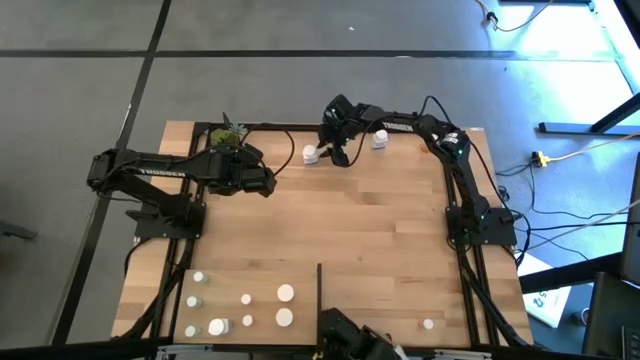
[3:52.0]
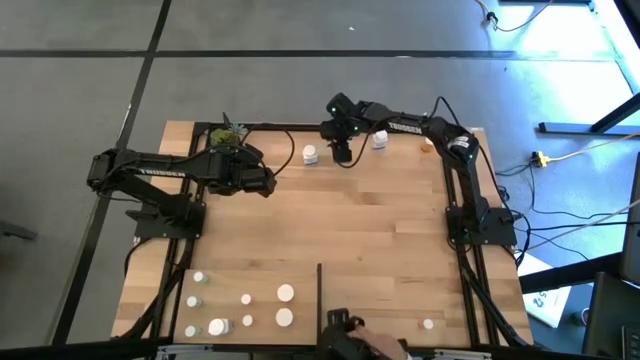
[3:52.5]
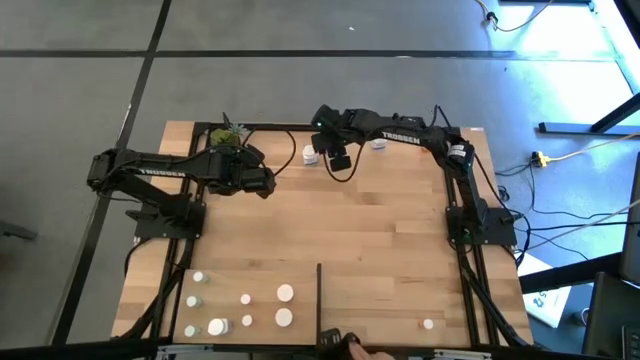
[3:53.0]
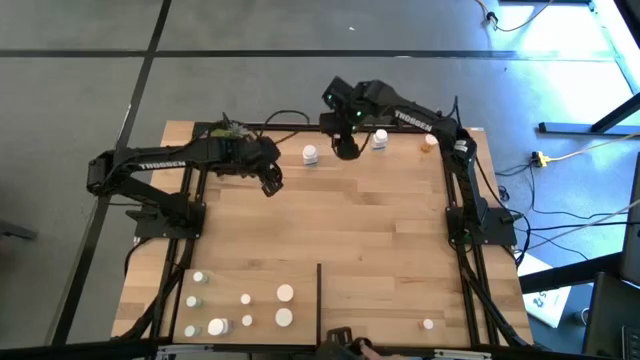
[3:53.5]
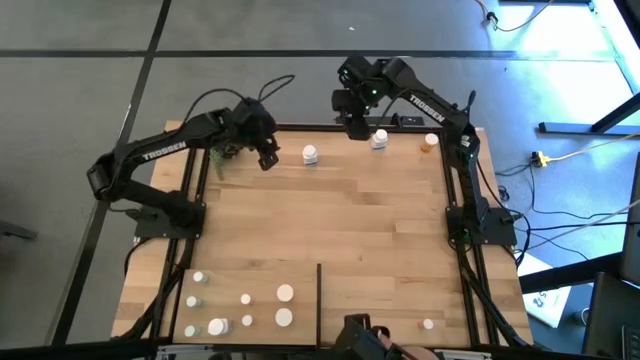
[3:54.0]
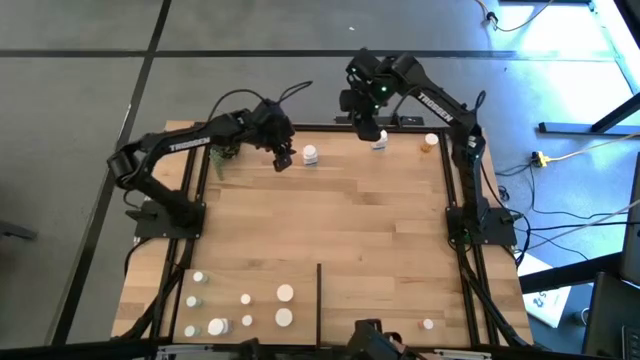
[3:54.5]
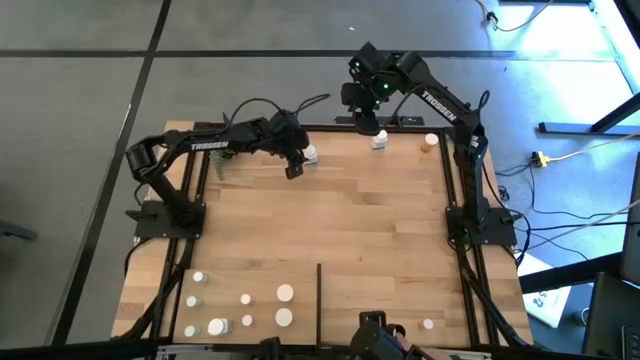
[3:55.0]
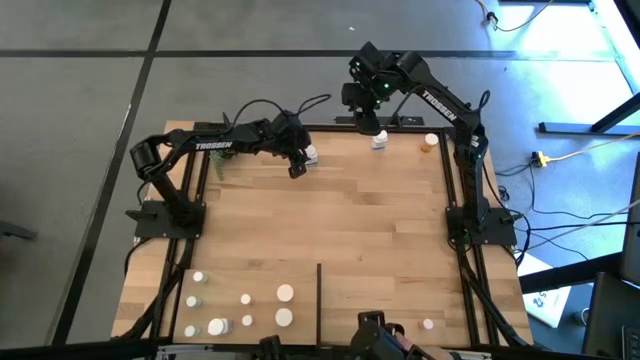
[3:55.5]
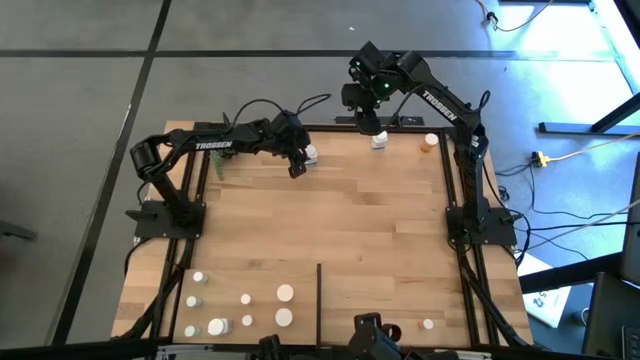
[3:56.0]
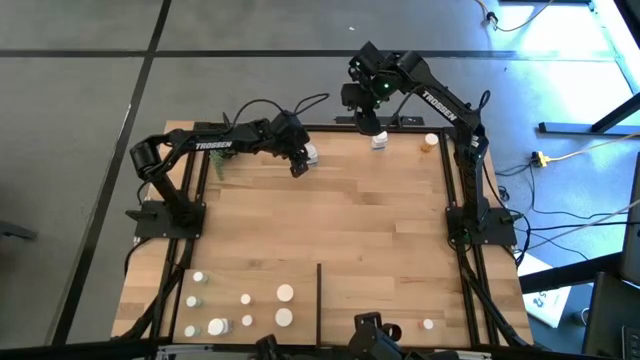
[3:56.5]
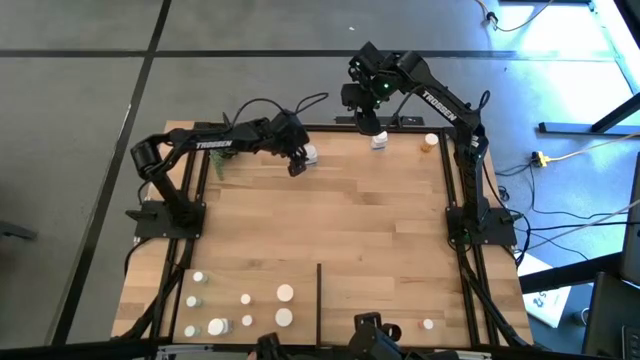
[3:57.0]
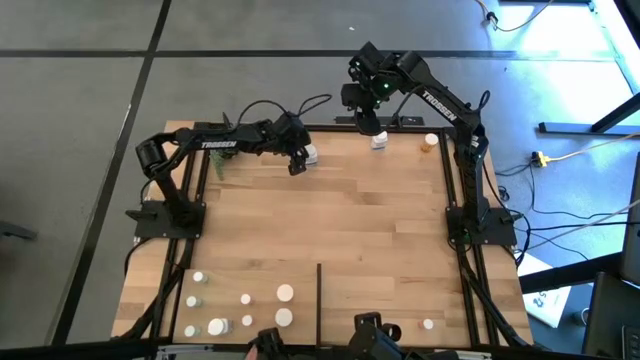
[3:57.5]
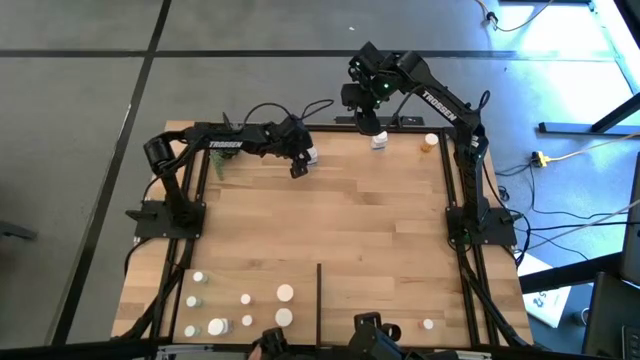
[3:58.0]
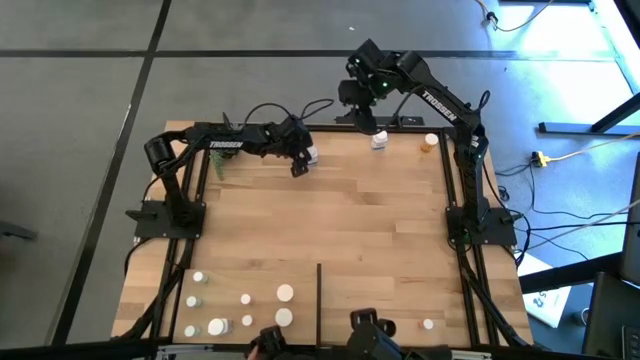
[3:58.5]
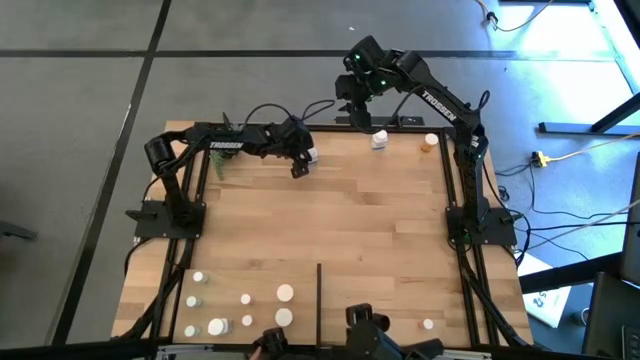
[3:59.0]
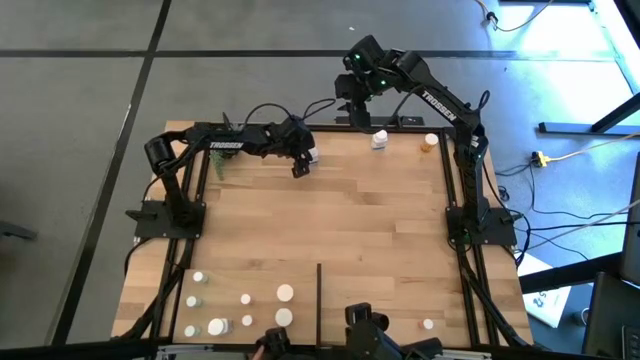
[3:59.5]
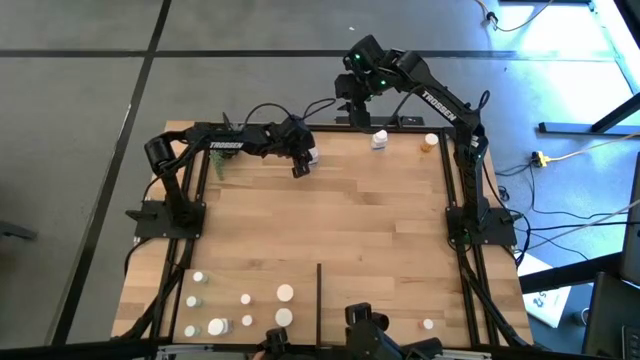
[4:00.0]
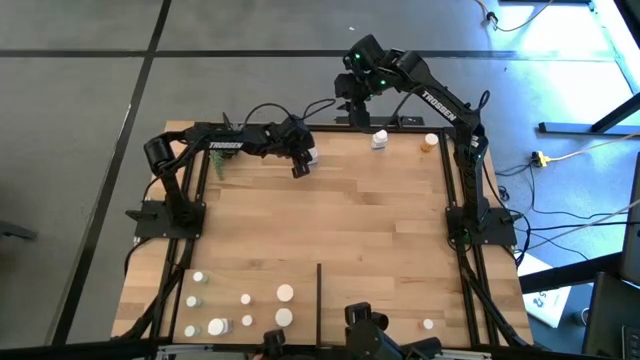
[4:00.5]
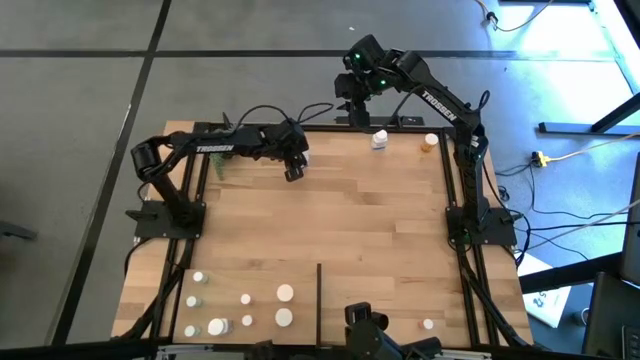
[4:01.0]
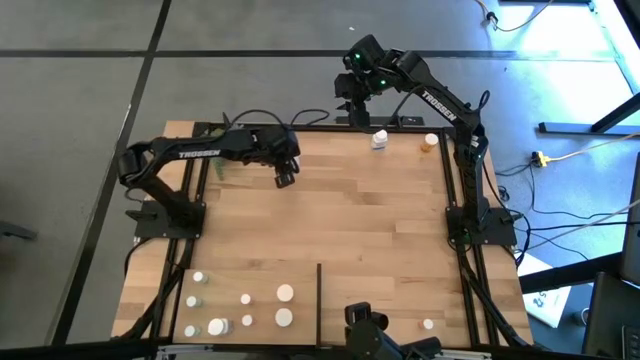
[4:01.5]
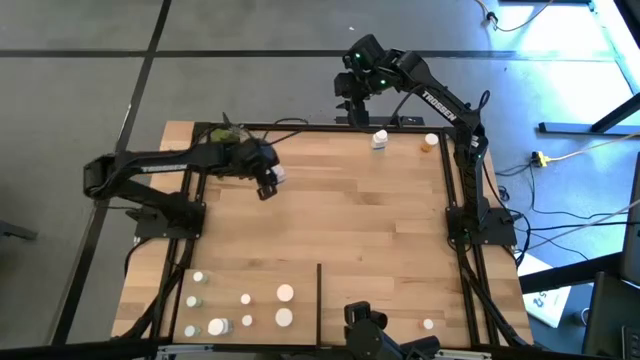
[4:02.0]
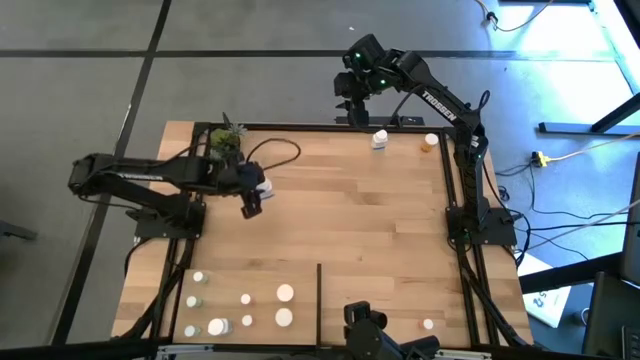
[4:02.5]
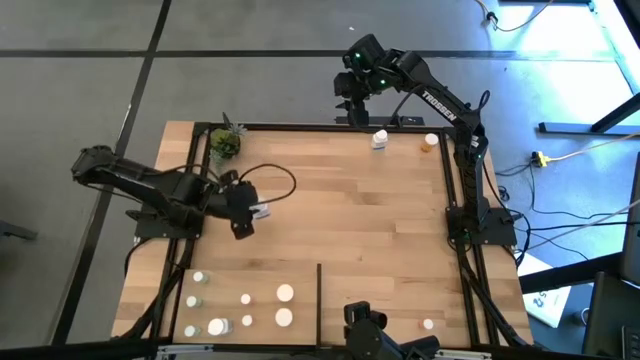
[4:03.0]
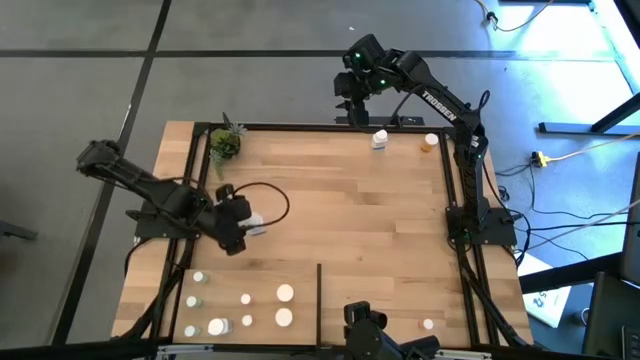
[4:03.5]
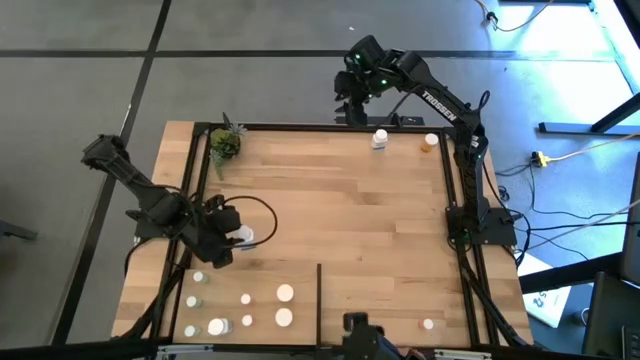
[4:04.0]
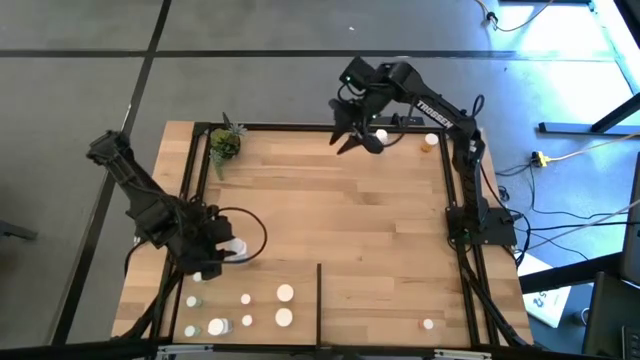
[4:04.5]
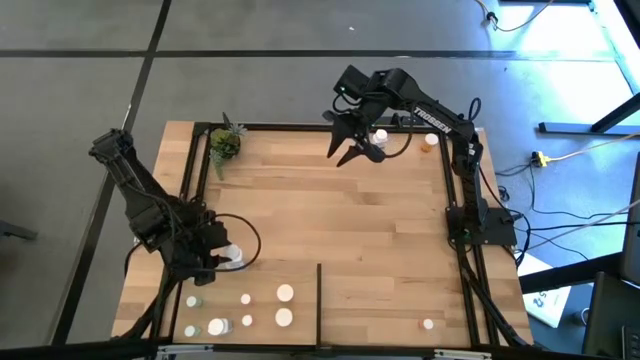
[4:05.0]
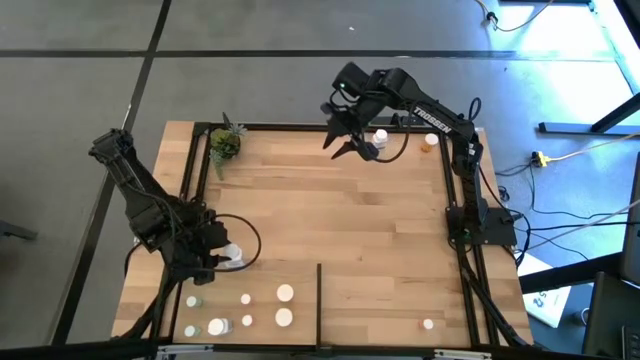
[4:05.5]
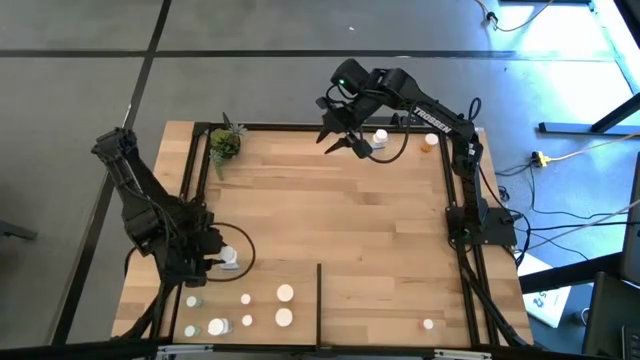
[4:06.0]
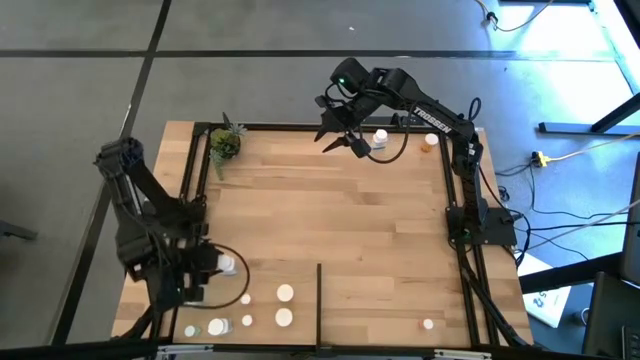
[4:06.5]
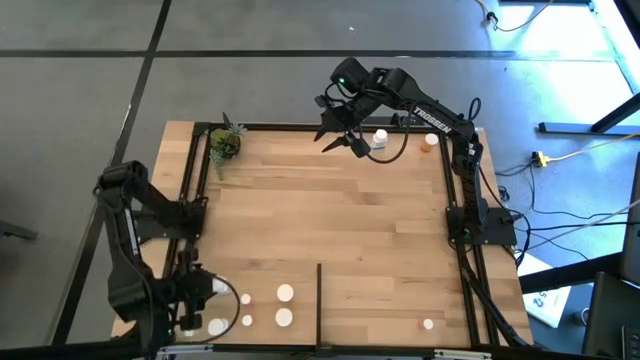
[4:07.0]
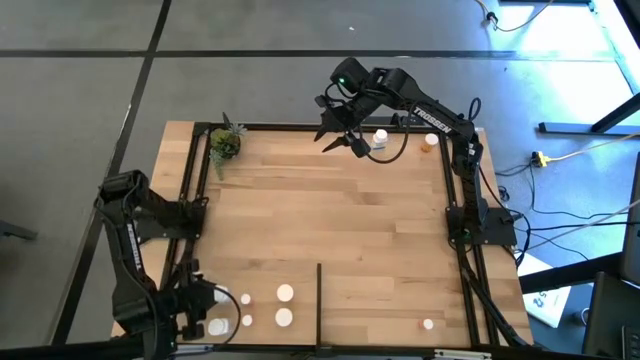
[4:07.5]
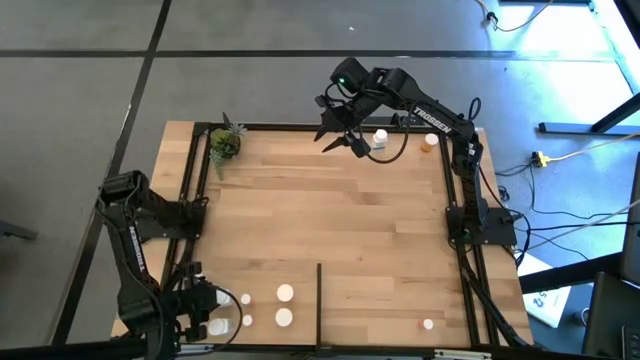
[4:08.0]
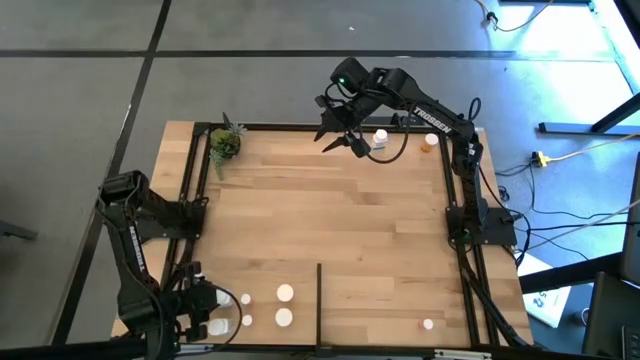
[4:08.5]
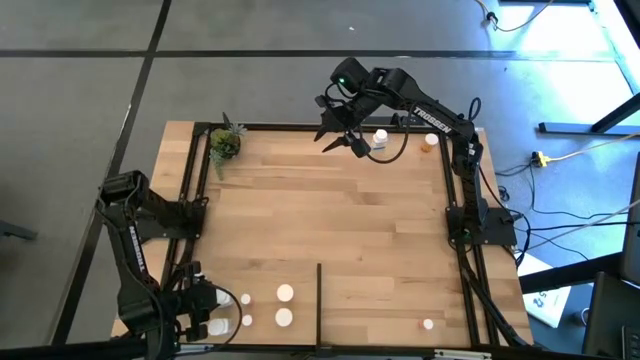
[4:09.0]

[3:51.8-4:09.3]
Task: Pick and place medicine bottles onto shelf by color
Put the left white pill bottle on the shelf aligned with the other white pill bottle

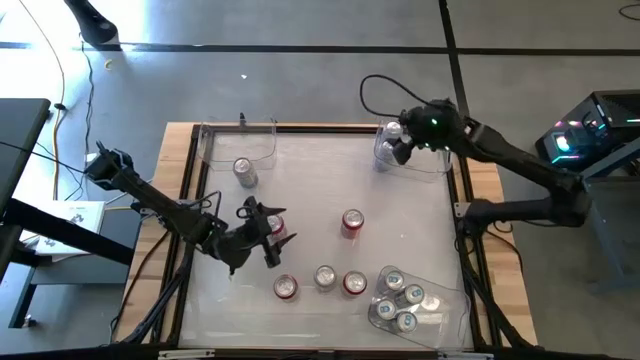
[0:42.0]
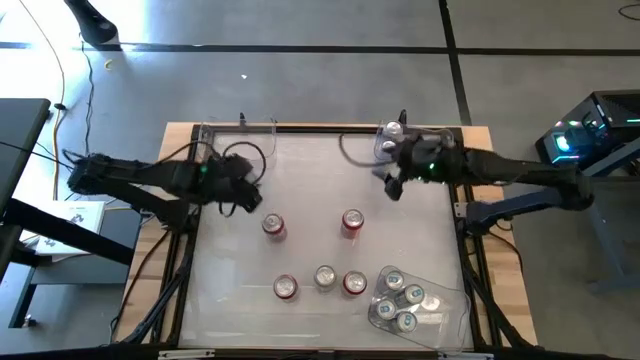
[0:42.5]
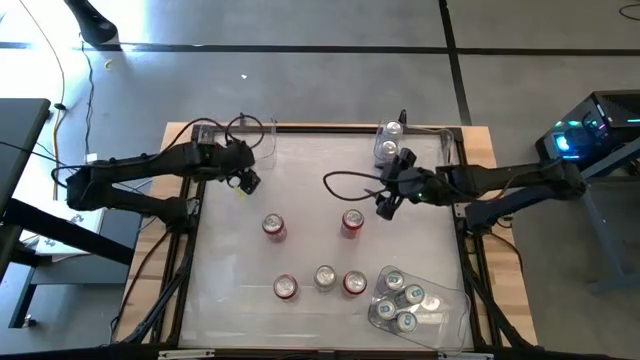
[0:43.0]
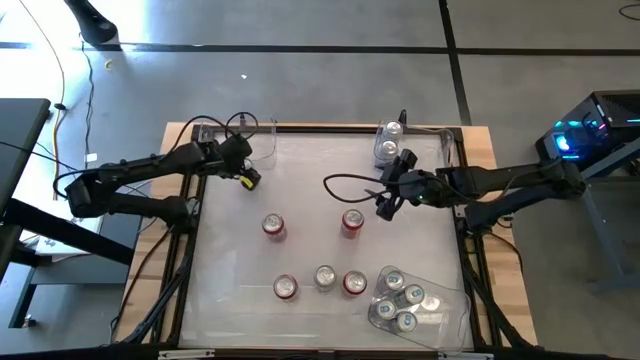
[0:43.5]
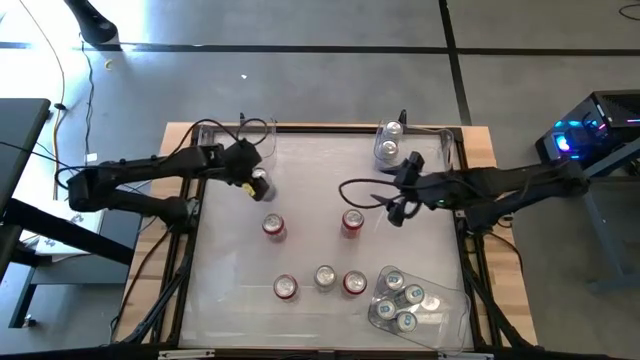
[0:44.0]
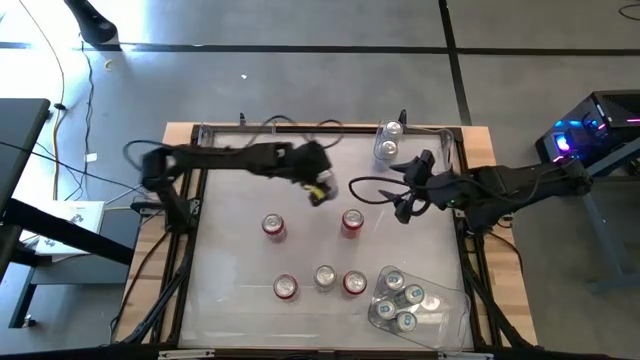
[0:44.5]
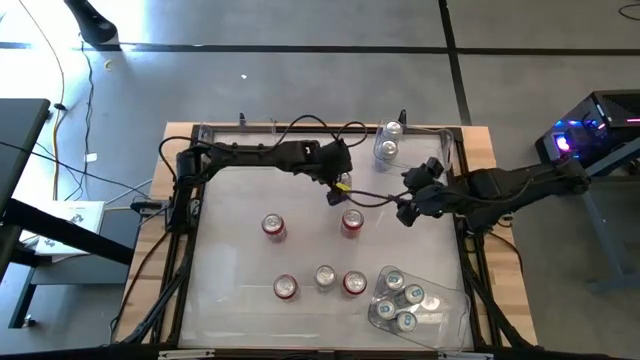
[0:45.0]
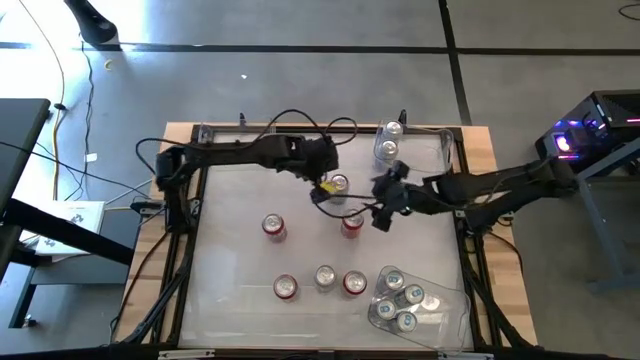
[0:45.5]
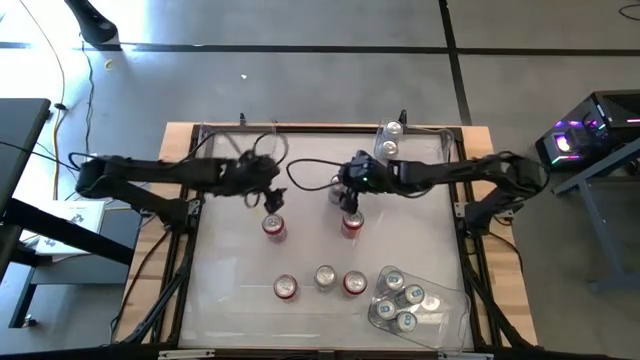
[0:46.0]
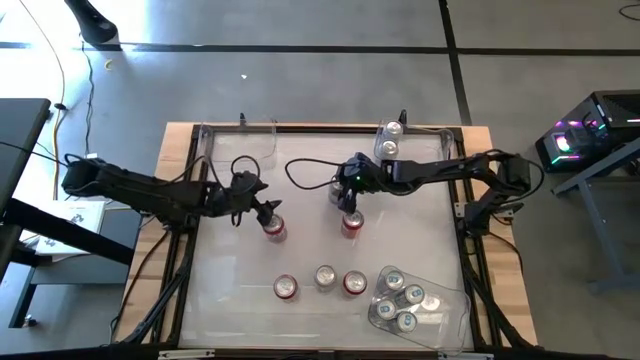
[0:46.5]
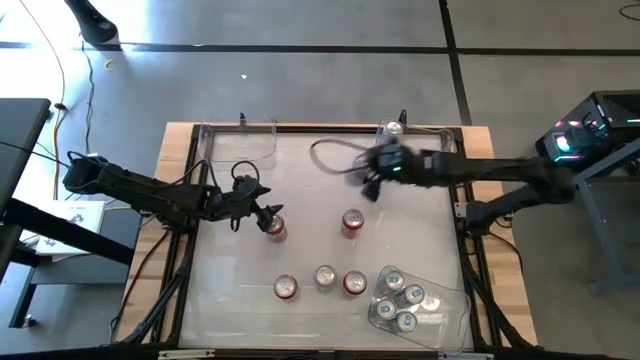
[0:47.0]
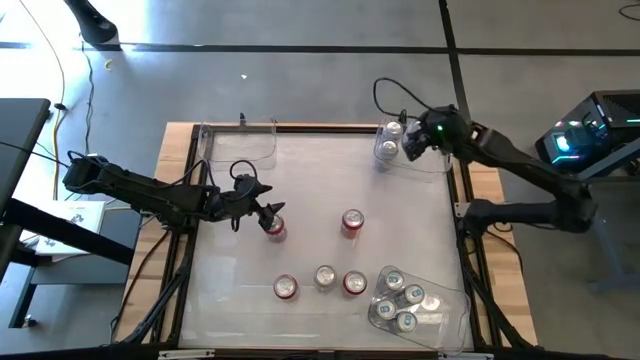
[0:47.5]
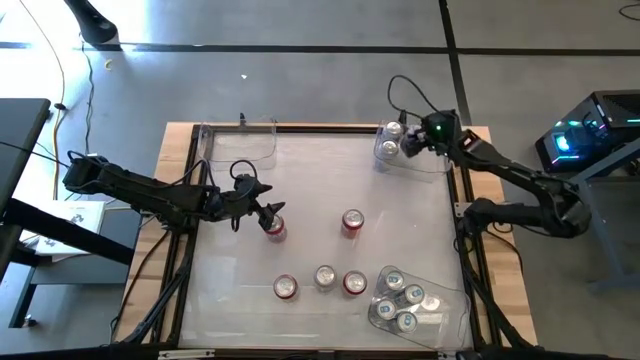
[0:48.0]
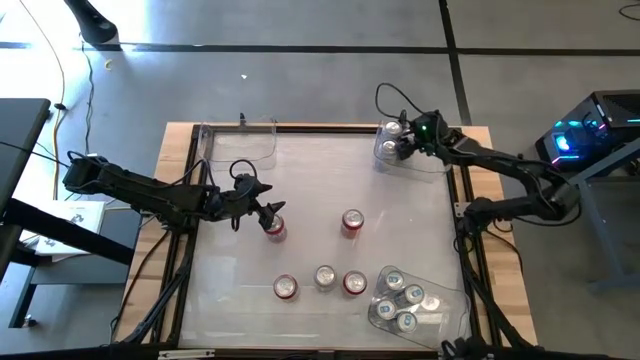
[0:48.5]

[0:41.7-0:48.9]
Task: Sort soda cans
Put the blue white soda can into the top right transparent bin
